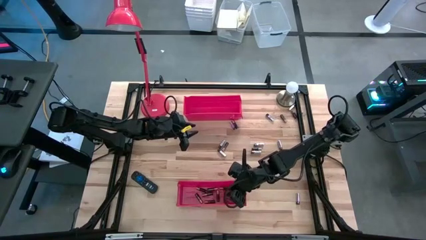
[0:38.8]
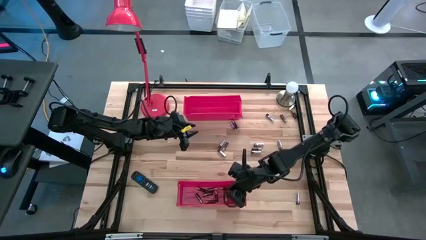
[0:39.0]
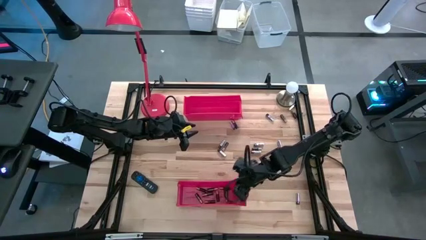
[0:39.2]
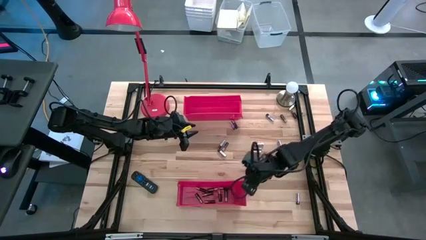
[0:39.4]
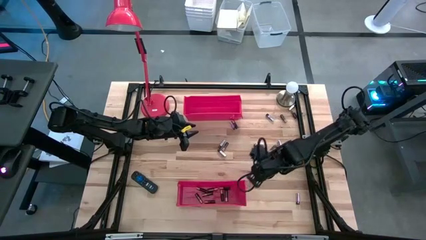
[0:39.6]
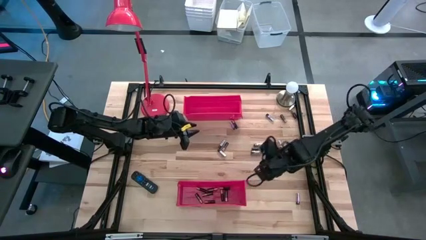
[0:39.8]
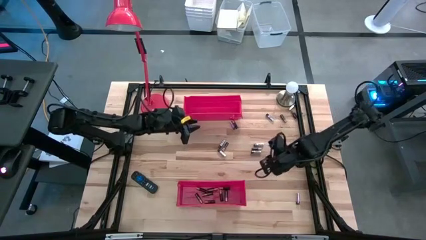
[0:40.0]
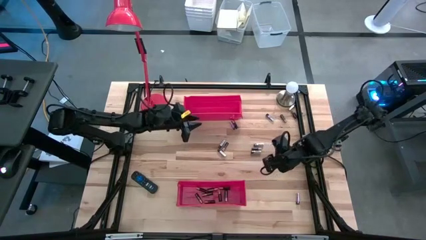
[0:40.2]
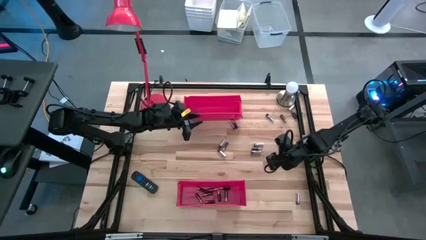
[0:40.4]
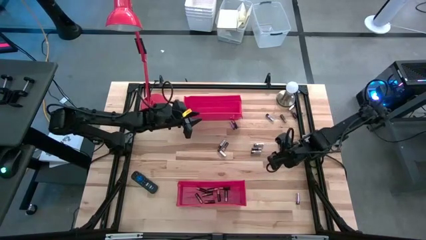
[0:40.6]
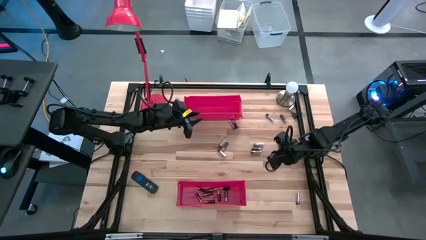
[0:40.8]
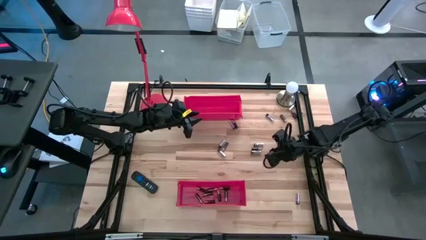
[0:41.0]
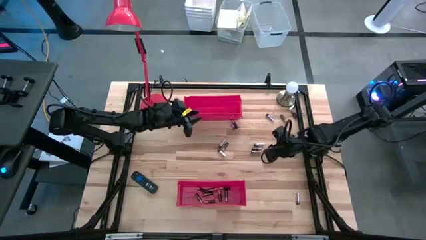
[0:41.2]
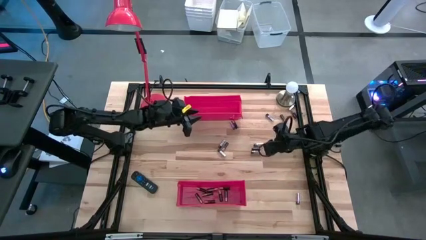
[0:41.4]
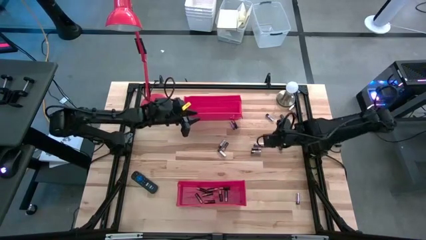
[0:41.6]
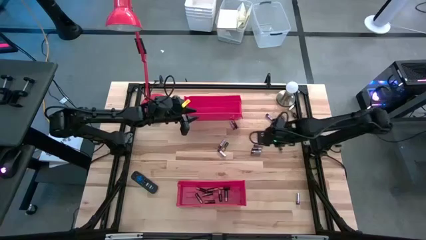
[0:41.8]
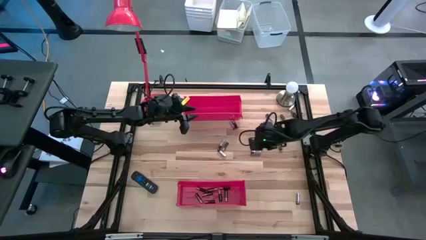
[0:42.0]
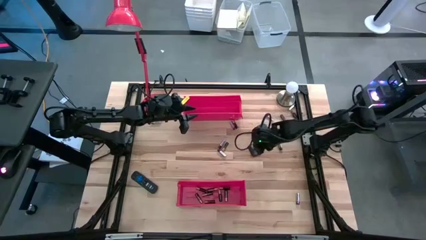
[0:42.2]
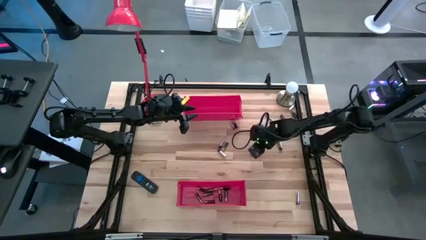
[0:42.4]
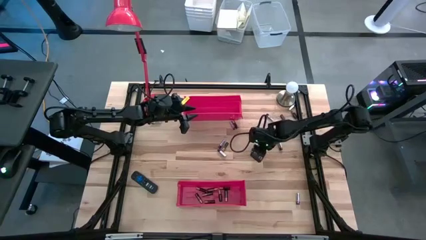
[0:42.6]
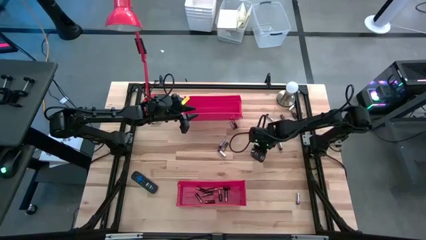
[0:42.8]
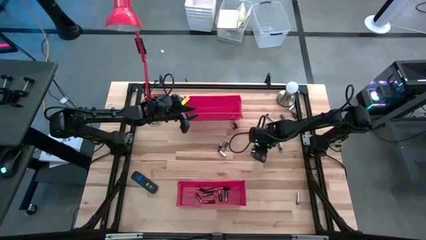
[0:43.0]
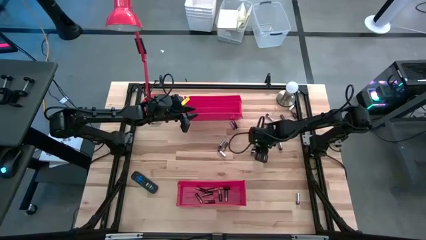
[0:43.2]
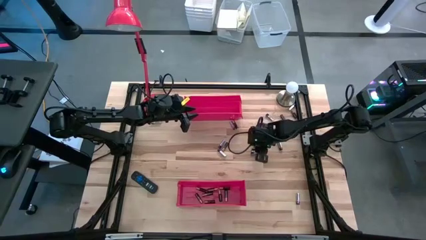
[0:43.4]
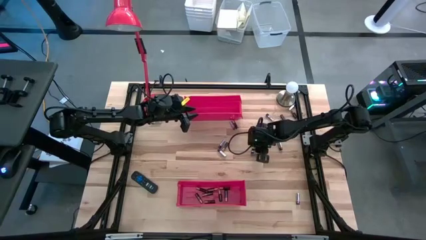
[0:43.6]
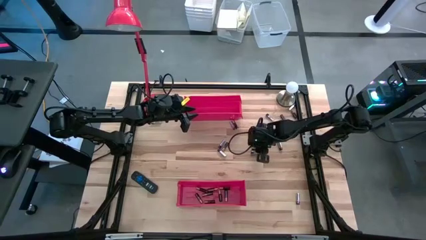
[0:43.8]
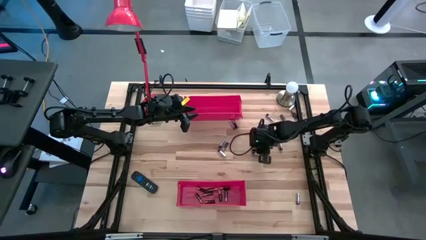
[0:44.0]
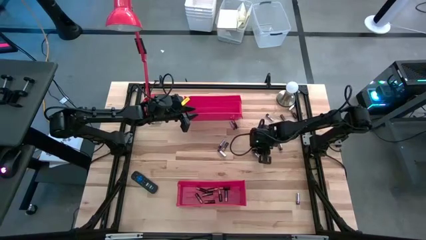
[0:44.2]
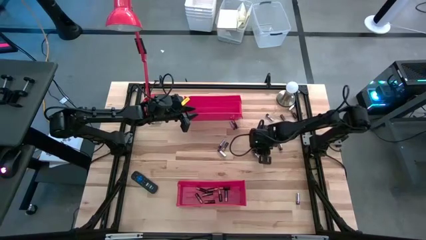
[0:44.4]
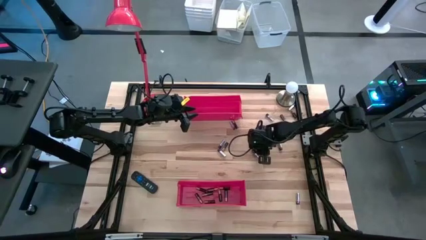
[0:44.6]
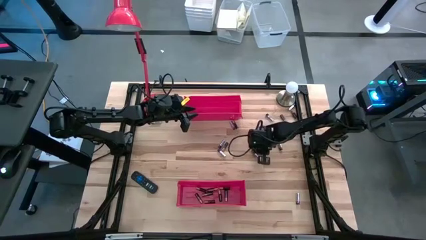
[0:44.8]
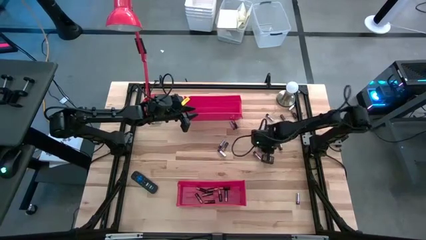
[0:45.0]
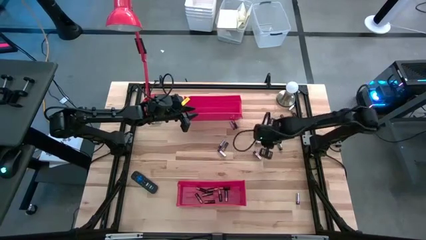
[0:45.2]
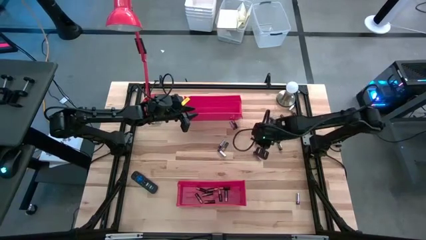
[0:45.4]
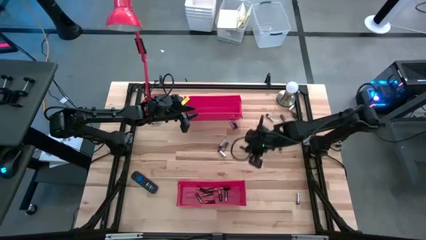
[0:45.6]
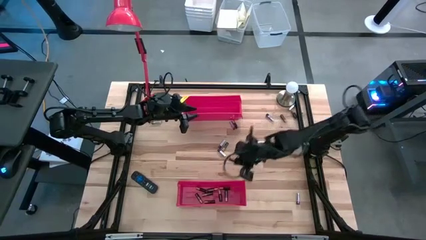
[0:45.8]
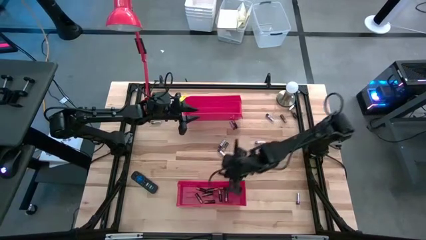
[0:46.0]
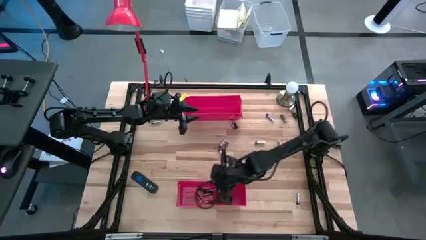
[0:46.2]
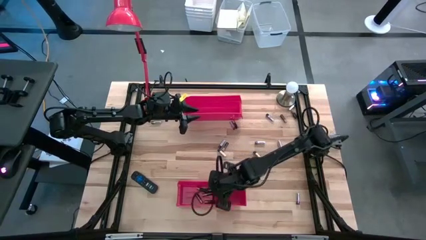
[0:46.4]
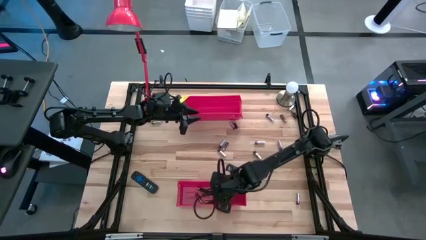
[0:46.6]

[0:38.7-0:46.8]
Task: Sort batteries
Put the brown battery into the bottom red bin

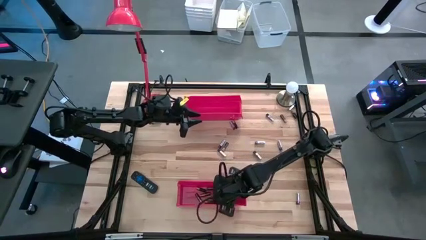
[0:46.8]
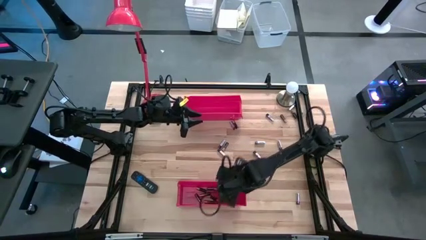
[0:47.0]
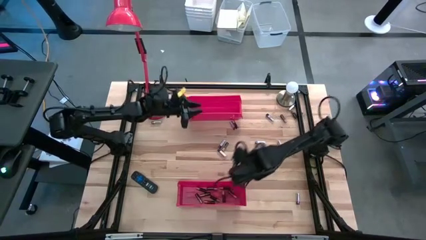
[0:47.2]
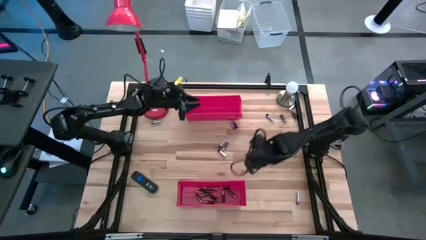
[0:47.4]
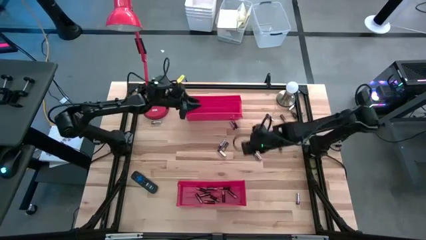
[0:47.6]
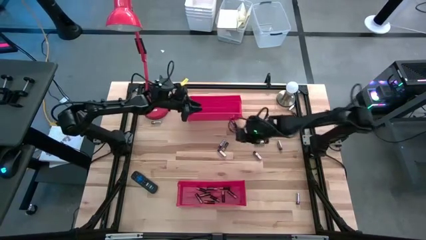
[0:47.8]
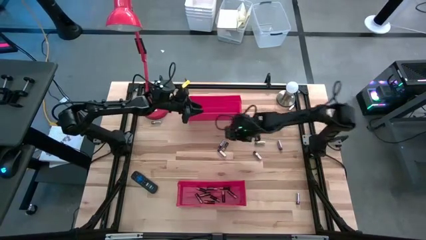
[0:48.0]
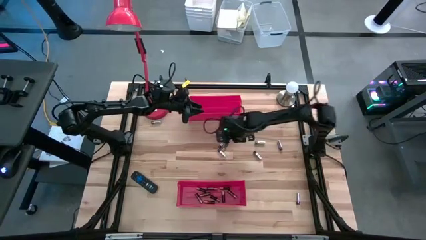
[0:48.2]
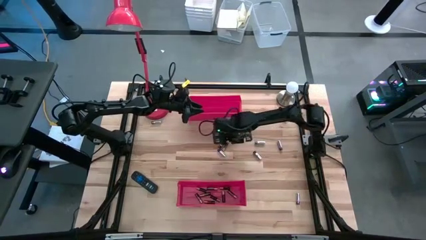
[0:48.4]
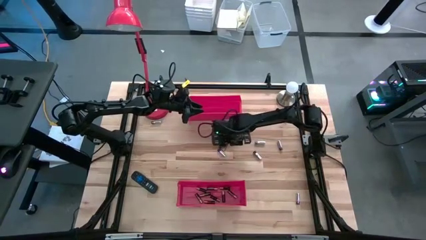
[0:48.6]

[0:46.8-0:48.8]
Put the brown battery into the bottom red bin

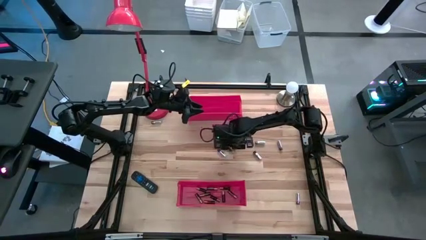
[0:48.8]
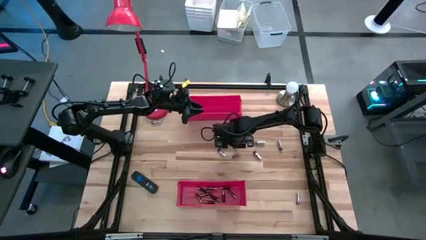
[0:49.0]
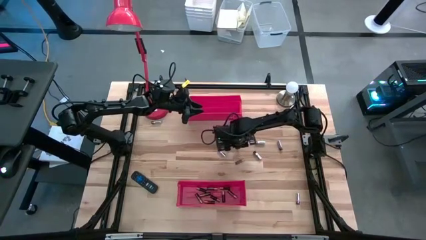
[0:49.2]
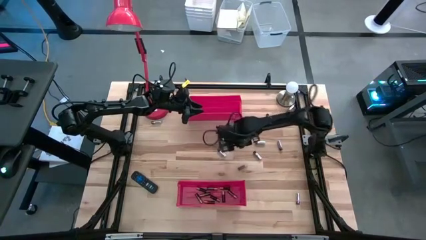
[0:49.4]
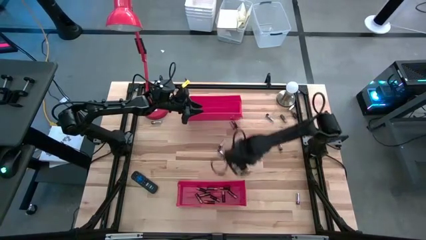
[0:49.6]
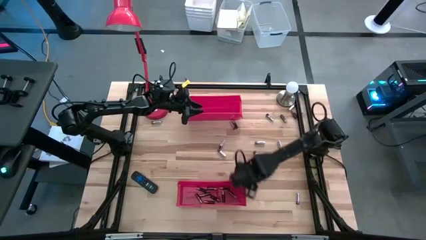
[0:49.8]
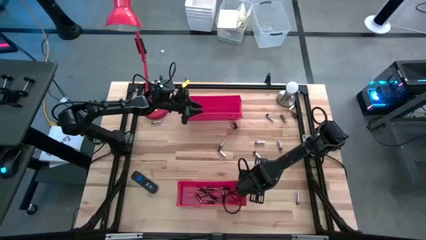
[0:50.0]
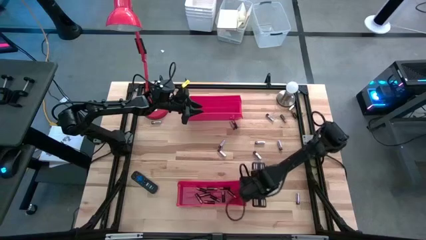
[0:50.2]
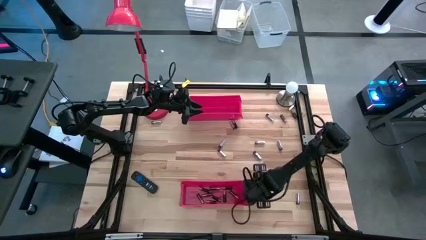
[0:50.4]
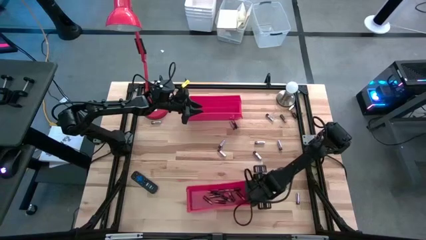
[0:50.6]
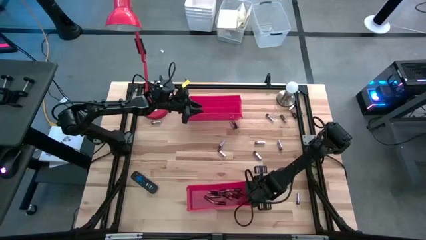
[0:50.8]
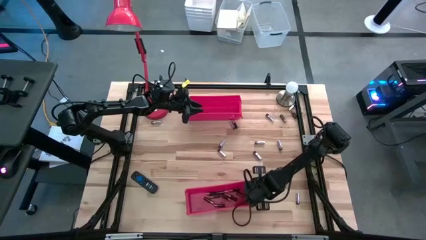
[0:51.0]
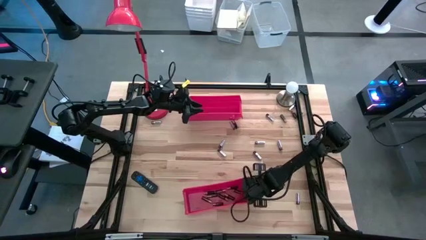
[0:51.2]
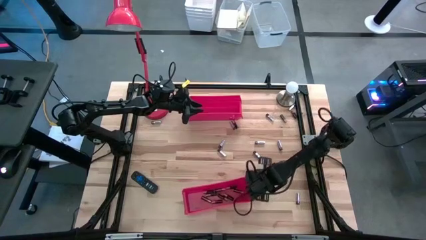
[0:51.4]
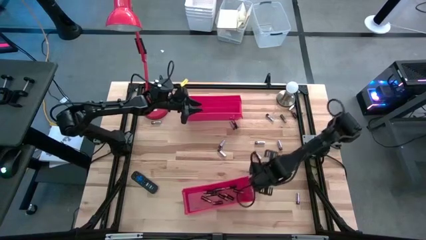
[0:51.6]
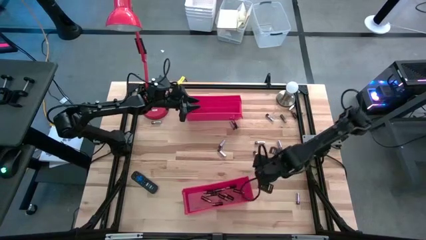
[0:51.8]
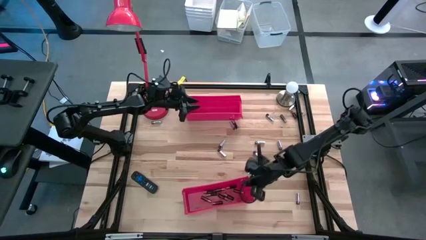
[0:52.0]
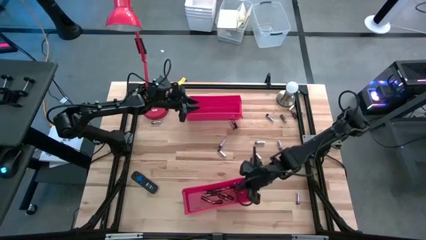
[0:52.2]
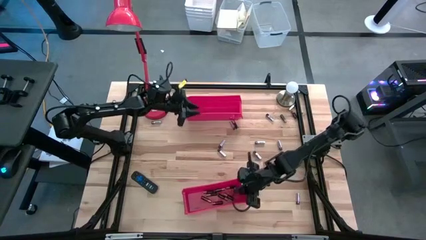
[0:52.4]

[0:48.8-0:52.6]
Put the brown battery into the bottom red bin

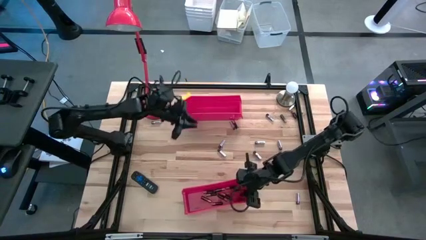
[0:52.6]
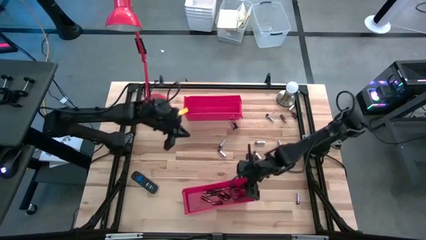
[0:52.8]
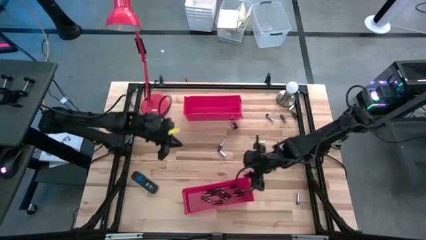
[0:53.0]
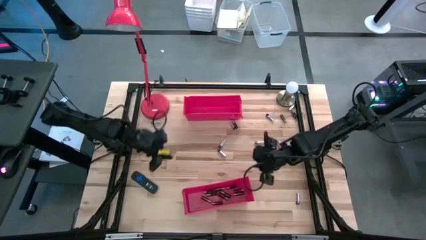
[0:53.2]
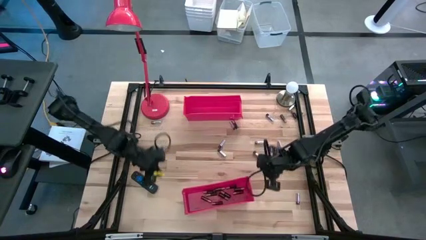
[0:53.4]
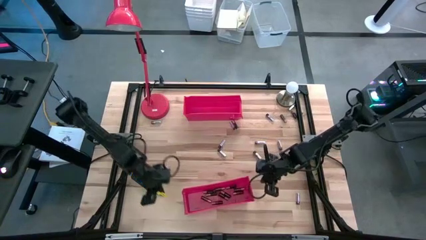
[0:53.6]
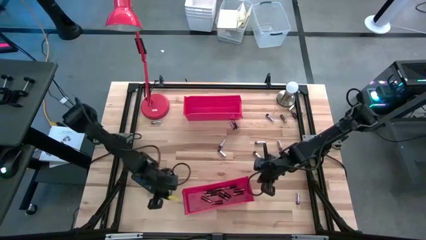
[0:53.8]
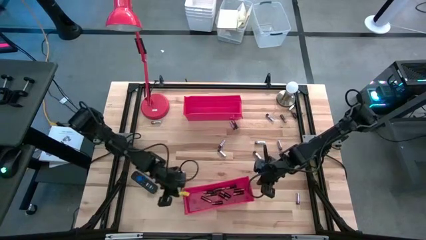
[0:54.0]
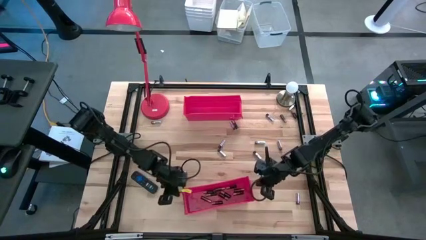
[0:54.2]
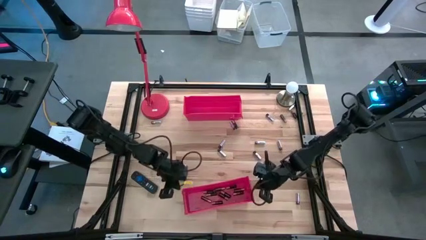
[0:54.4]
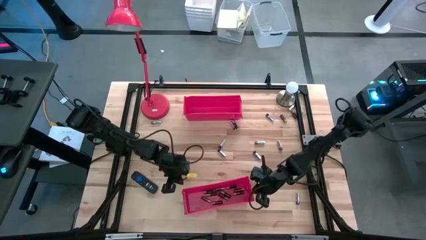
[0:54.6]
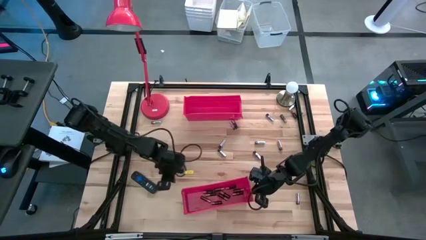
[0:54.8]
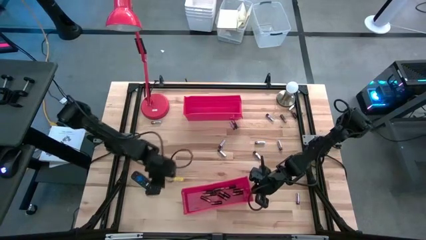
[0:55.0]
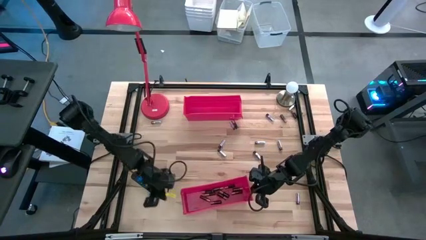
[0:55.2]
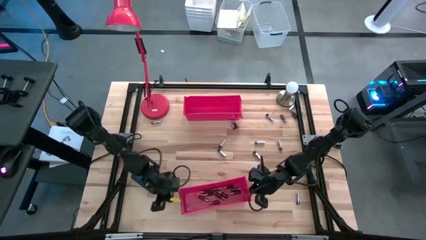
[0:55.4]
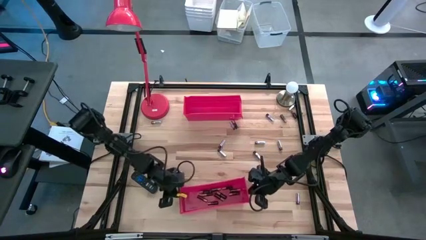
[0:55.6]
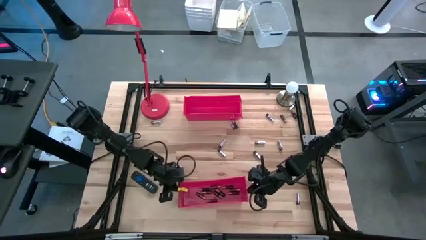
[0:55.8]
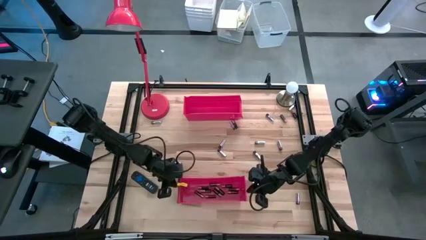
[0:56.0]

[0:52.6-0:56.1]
Adjust the bottom red bin
